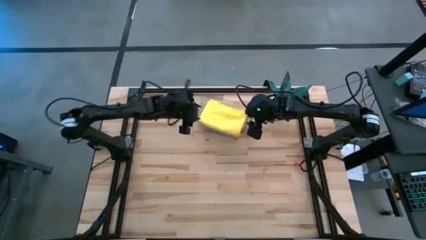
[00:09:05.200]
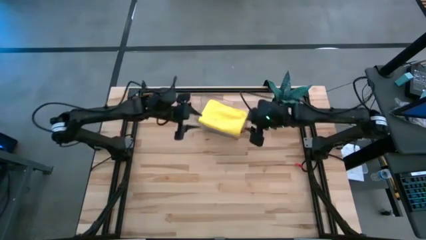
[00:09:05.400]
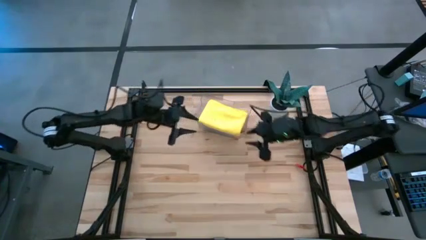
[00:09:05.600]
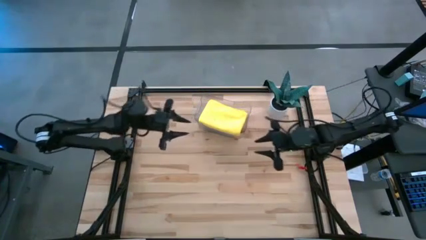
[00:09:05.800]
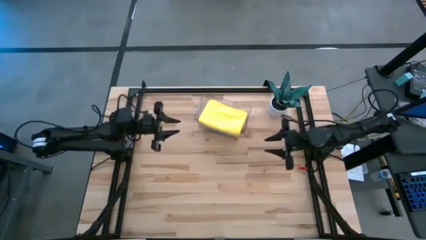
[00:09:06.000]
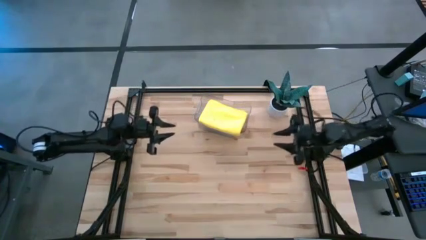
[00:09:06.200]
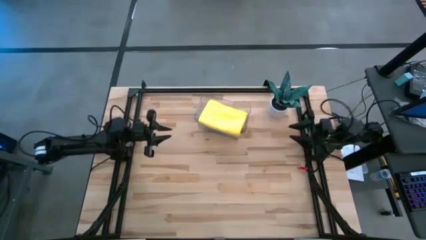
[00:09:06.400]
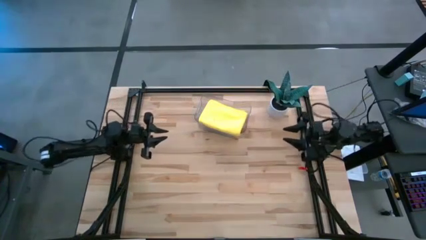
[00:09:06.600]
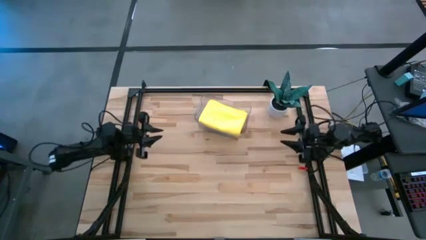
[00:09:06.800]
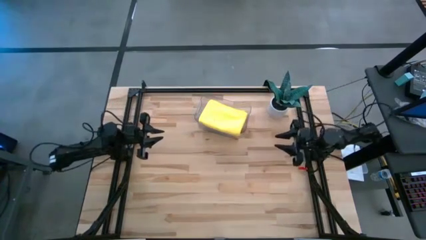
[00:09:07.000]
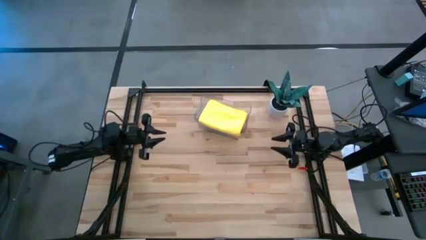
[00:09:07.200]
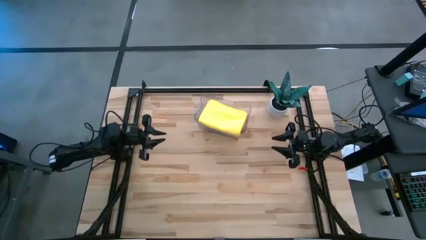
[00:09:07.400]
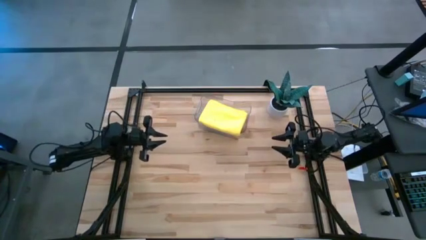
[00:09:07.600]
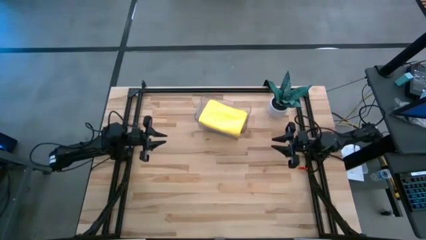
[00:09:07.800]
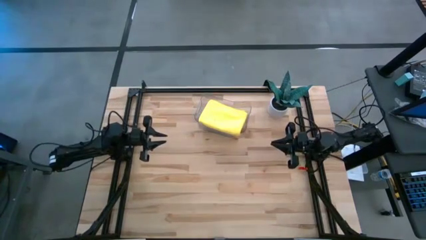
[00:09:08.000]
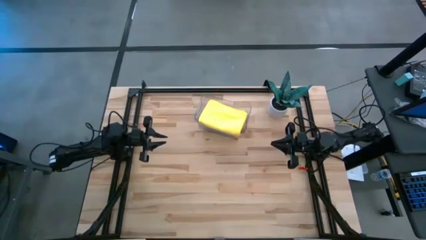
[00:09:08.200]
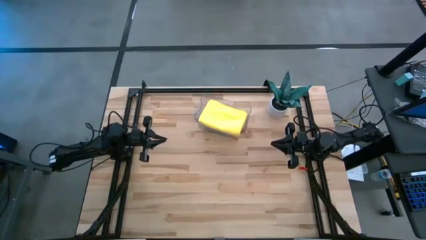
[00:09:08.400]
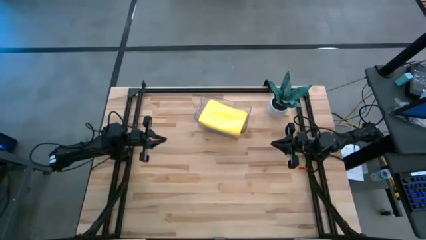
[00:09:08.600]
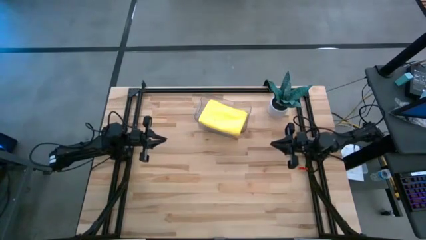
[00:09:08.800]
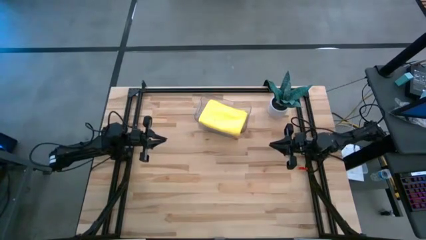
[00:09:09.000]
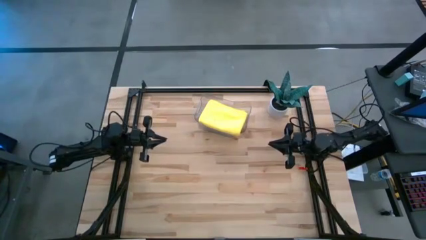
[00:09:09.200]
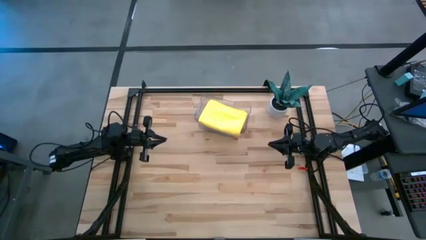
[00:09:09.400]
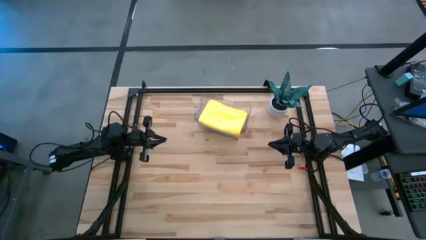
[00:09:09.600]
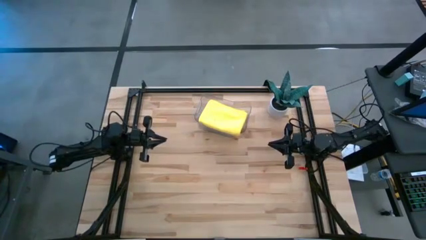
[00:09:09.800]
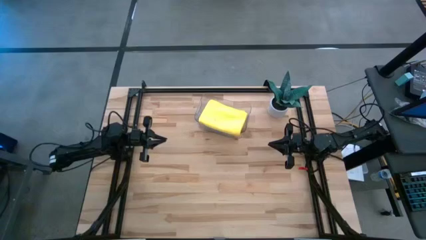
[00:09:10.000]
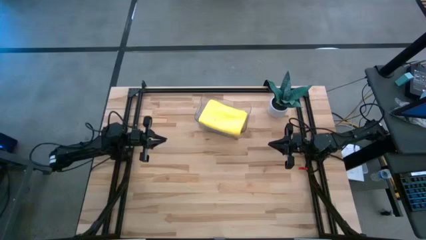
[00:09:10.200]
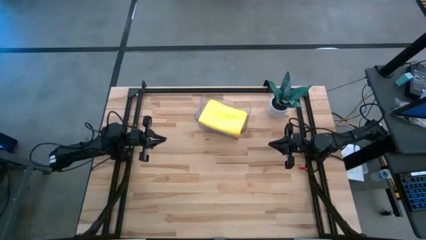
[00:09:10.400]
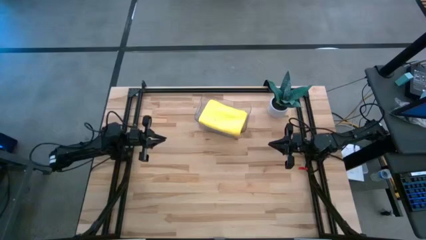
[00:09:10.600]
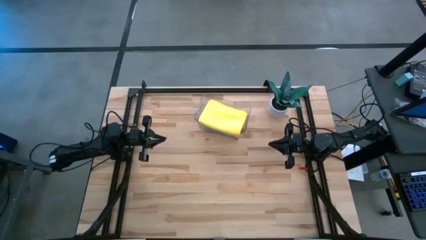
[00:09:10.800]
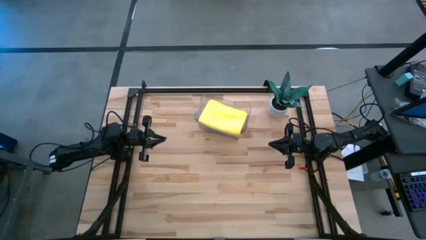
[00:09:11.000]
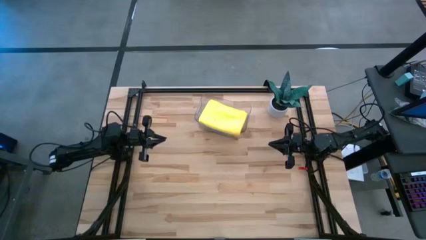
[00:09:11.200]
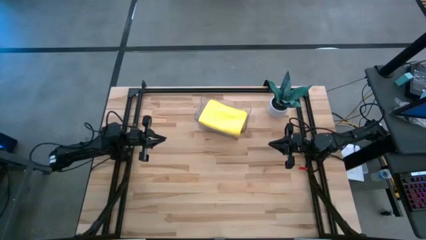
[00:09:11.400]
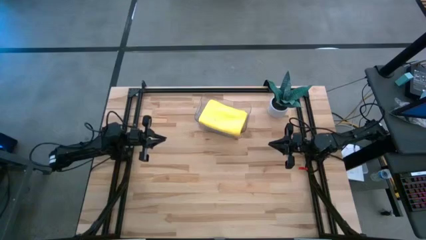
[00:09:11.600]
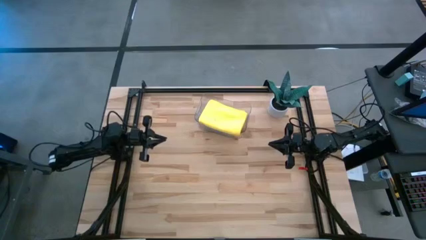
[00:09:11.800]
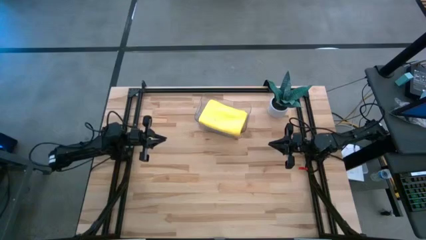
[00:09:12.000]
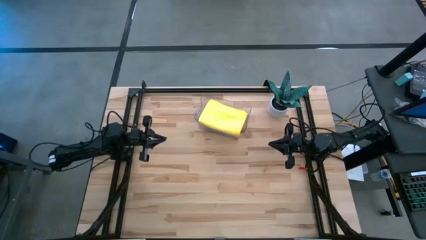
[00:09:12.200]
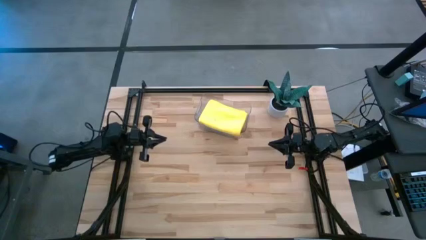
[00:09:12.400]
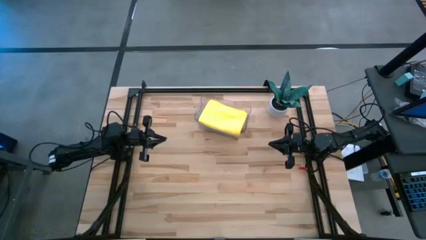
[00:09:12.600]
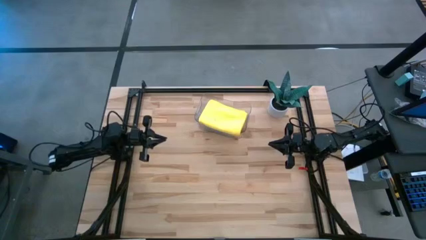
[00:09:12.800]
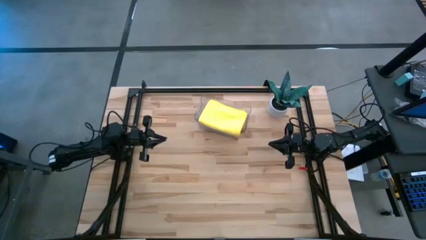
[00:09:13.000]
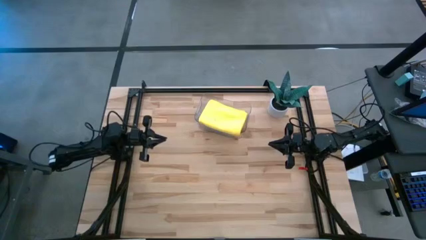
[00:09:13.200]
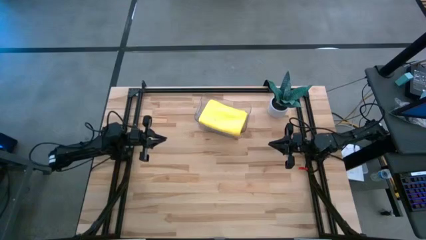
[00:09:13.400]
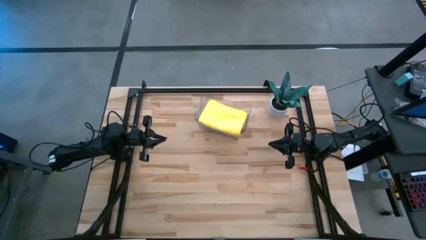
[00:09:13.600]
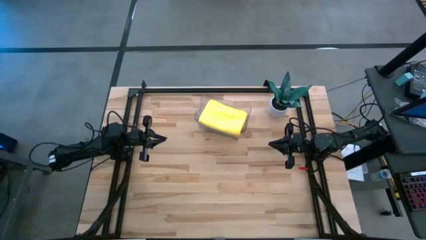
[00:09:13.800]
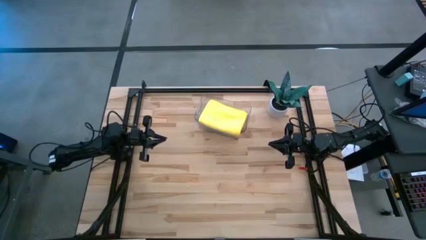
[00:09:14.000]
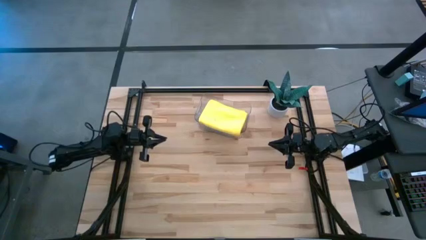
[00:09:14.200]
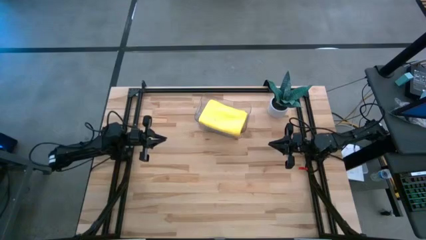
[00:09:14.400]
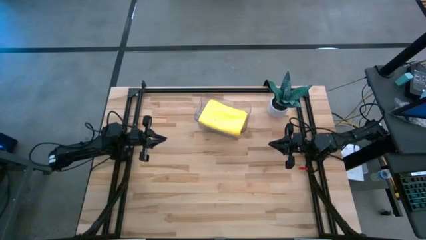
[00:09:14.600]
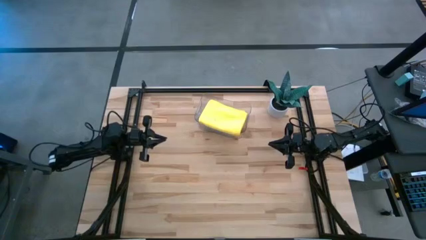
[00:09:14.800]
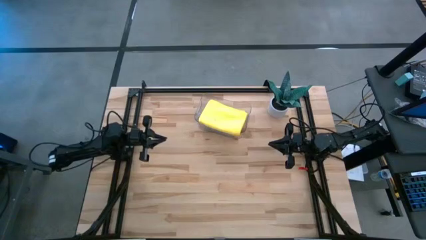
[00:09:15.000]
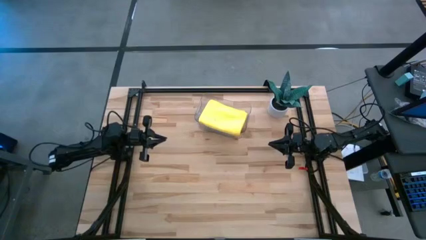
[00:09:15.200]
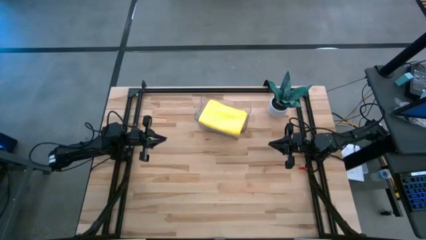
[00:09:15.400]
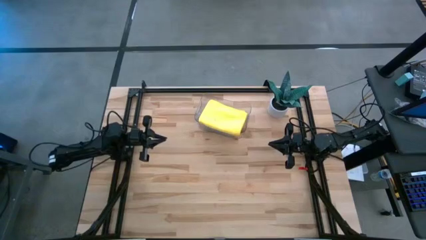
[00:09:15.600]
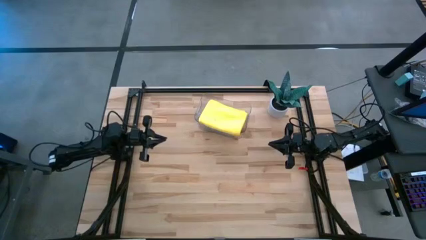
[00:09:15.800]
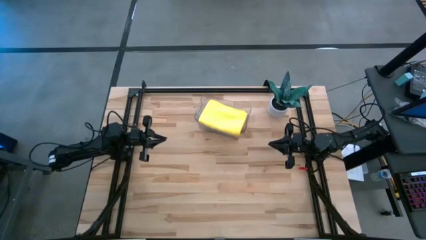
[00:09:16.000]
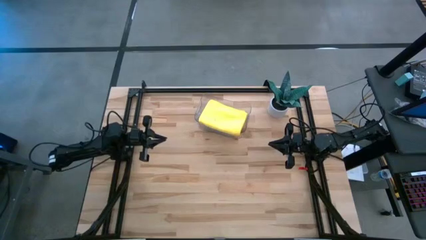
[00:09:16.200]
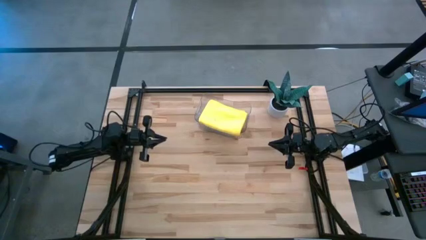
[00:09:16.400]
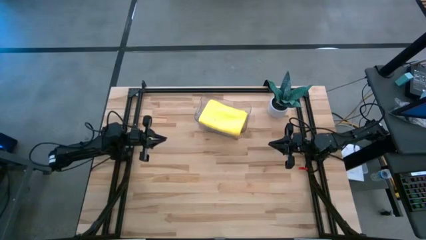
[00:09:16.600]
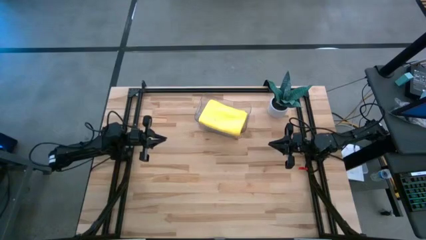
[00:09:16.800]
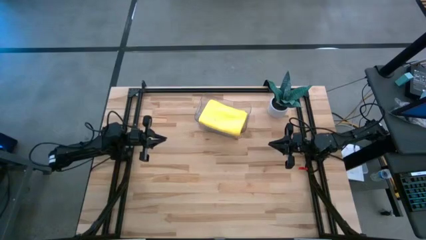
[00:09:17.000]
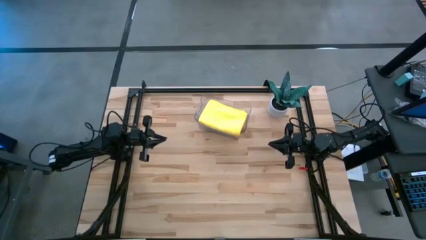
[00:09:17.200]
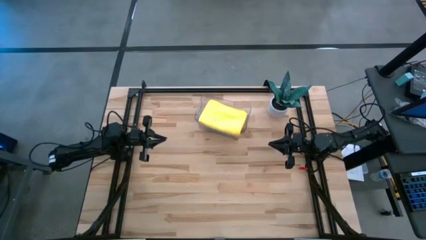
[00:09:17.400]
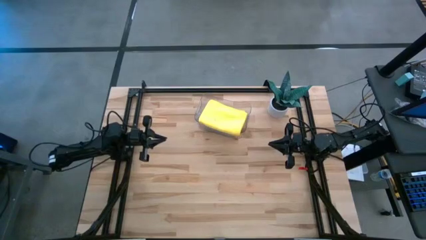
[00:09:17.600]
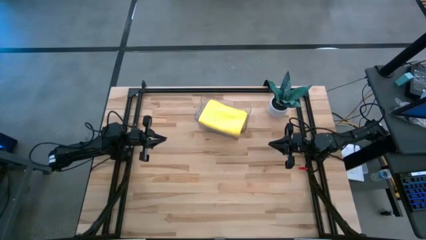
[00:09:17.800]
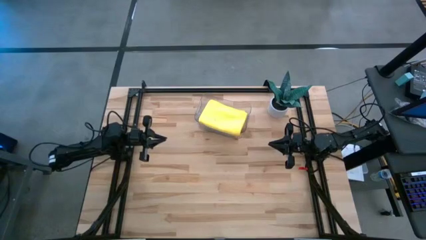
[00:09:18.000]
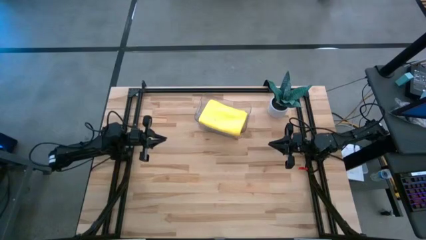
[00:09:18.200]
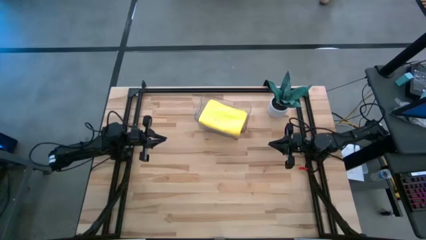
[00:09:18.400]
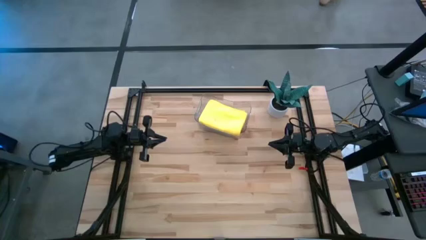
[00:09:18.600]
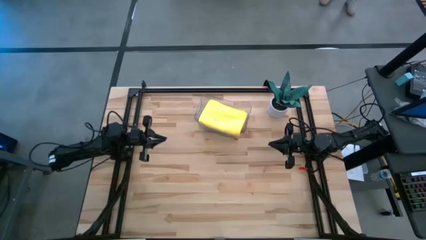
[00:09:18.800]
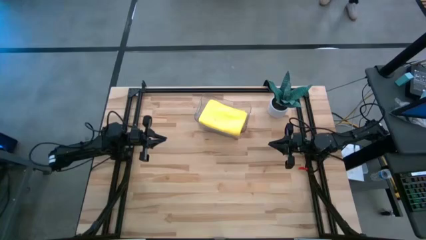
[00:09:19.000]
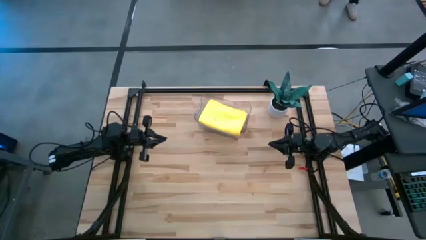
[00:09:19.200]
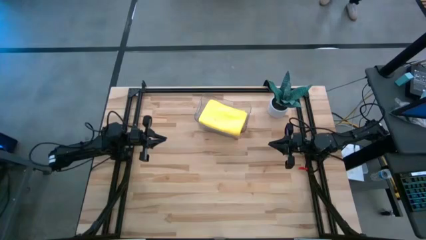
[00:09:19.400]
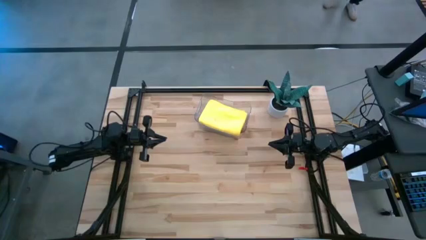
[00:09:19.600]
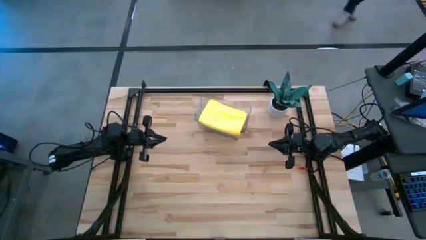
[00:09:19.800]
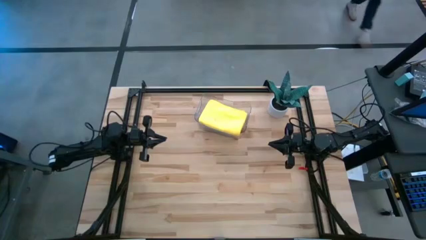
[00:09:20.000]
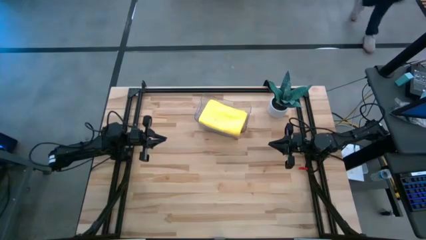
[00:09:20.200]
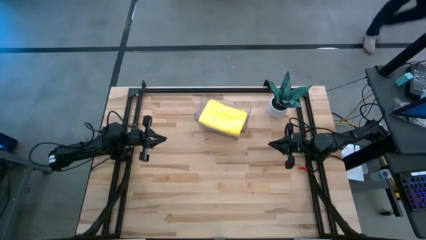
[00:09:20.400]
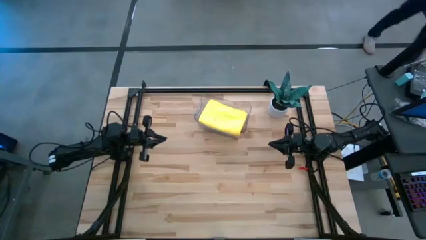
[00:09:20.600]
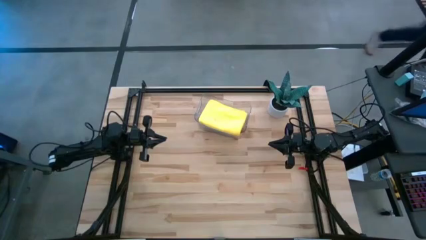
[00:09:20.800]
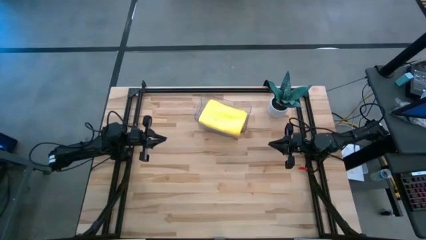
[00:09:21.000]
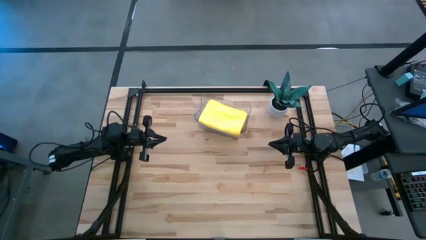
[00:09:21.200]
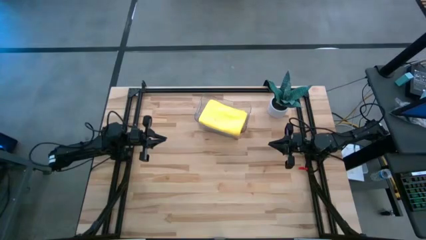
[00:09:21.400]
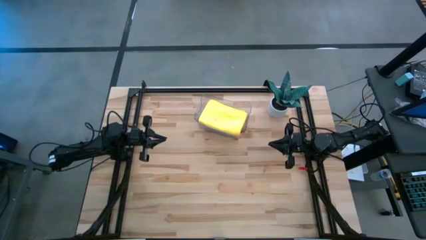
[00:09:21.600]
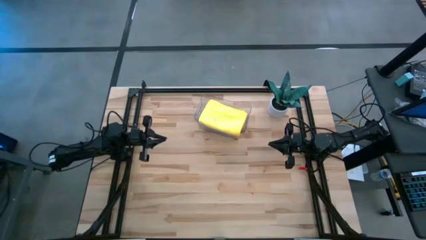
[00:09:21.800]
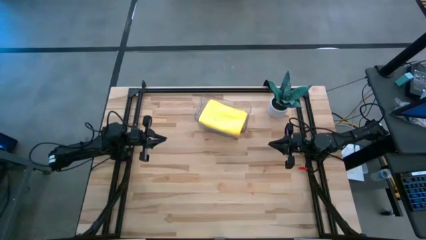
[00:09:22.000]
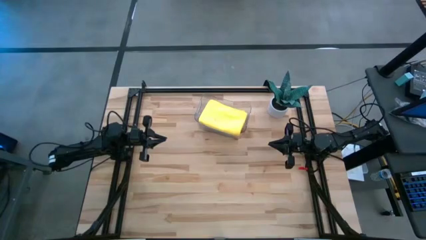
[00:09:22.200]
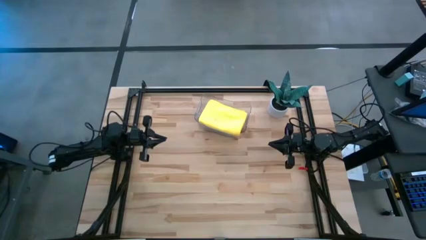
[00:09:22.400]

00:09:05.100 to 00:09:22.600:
Task: Fold microfiber towels
Return to Home Position
